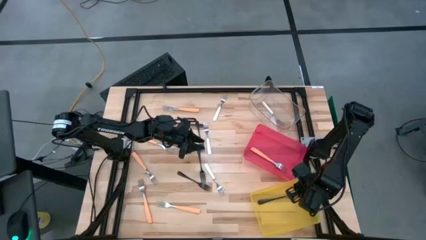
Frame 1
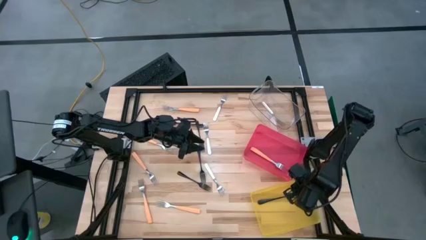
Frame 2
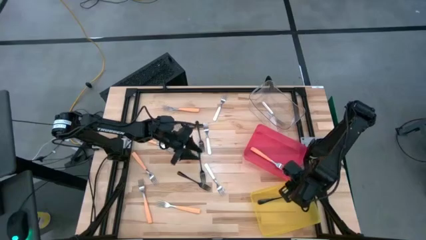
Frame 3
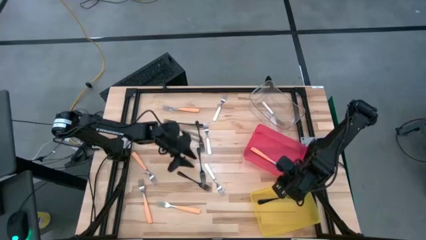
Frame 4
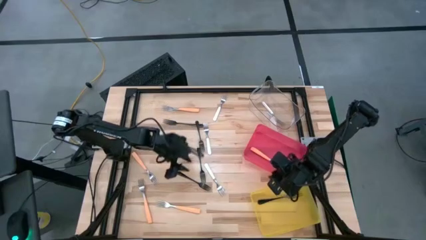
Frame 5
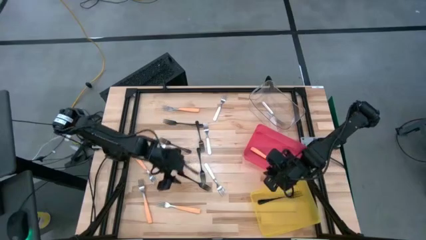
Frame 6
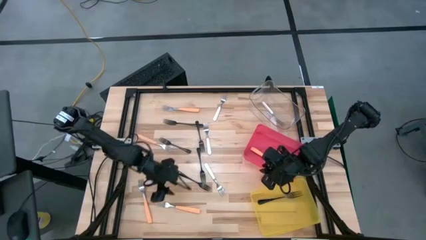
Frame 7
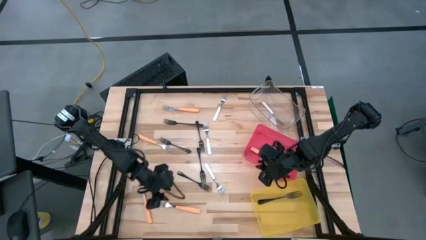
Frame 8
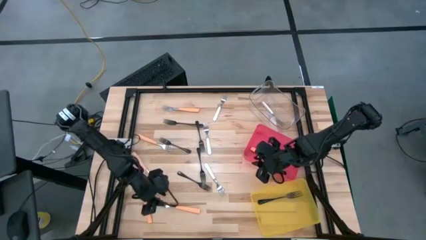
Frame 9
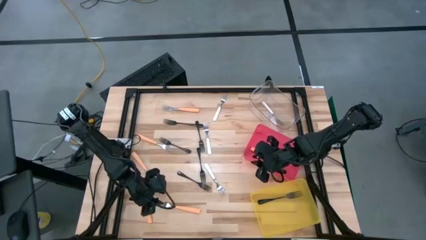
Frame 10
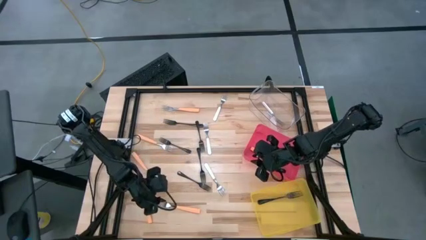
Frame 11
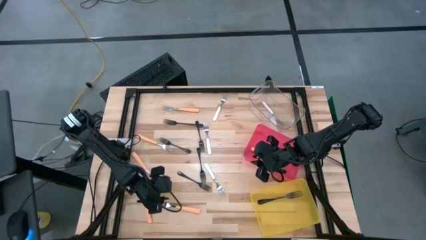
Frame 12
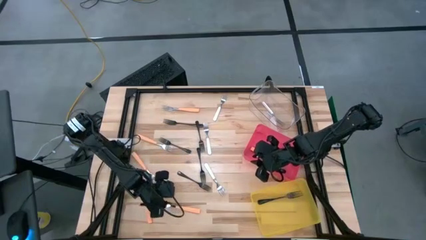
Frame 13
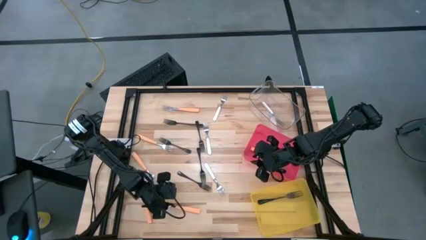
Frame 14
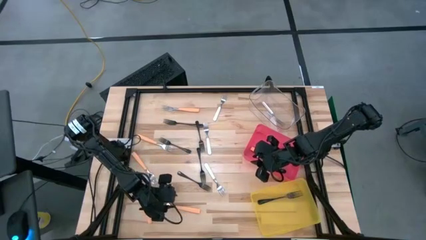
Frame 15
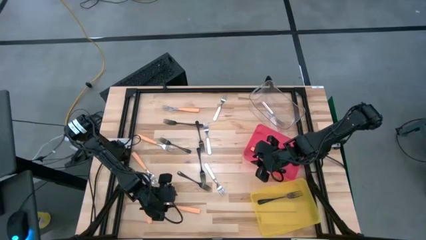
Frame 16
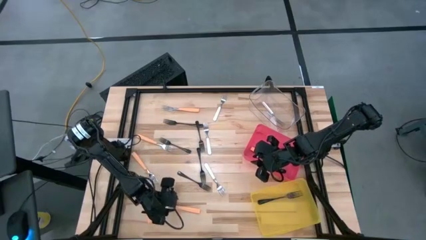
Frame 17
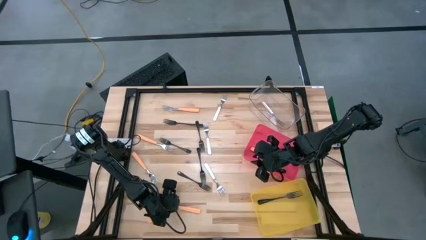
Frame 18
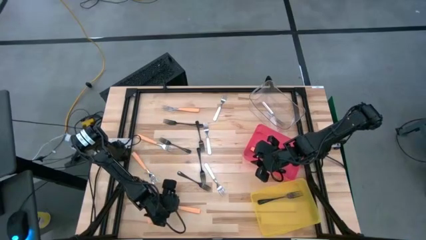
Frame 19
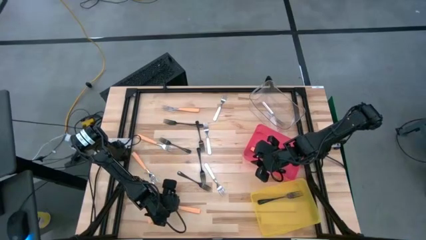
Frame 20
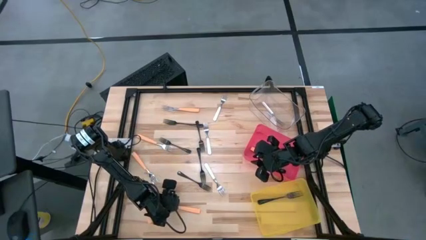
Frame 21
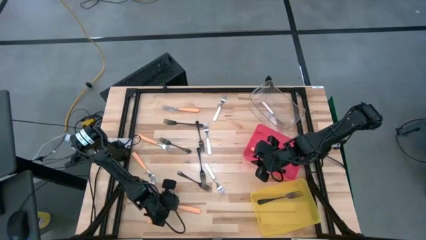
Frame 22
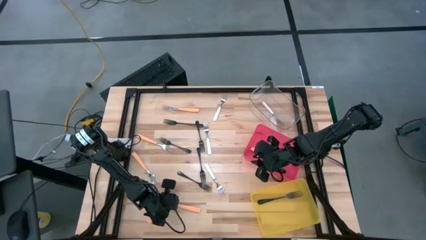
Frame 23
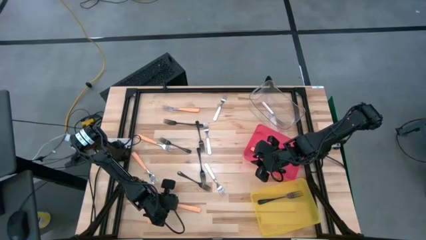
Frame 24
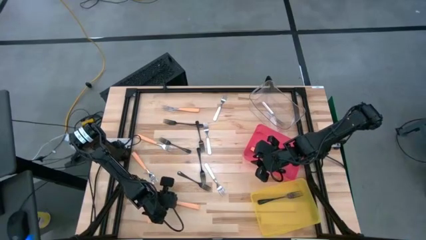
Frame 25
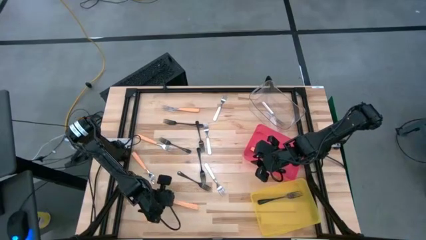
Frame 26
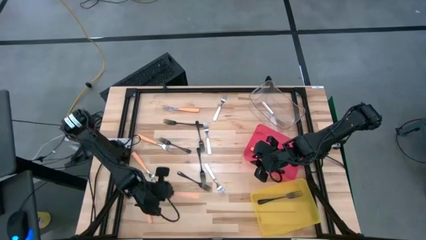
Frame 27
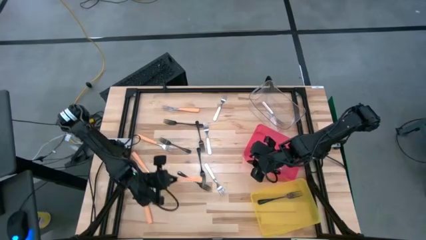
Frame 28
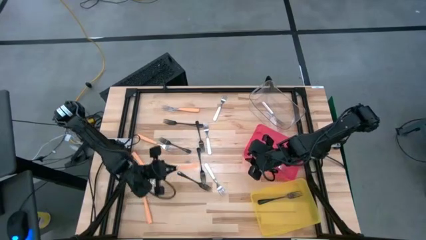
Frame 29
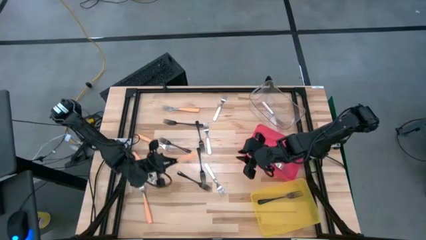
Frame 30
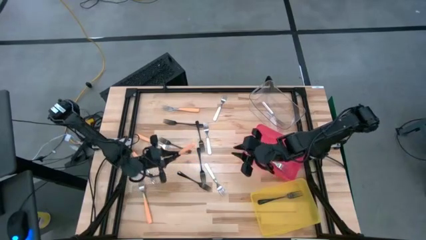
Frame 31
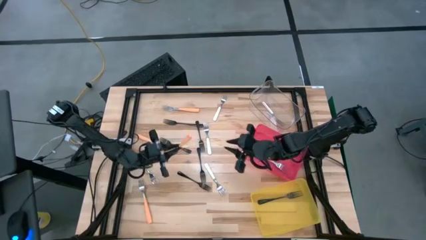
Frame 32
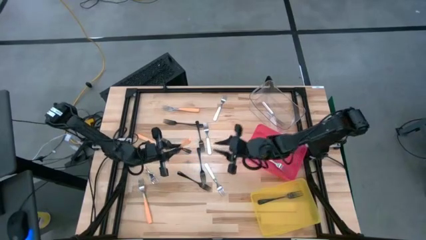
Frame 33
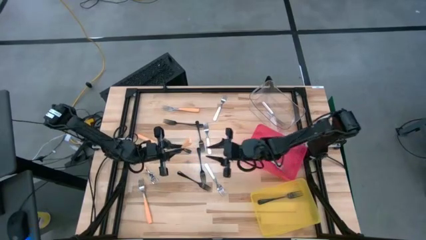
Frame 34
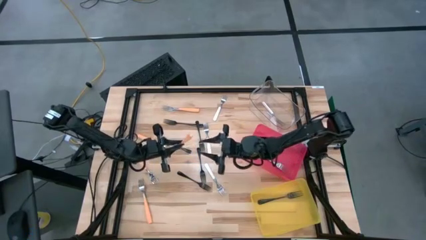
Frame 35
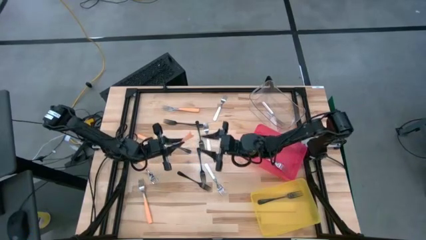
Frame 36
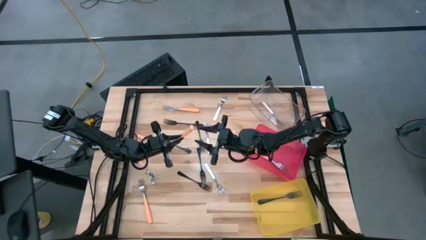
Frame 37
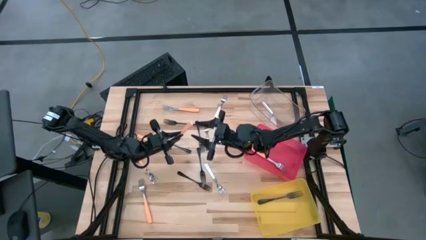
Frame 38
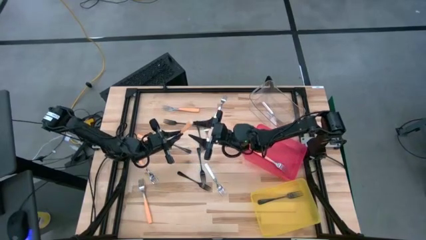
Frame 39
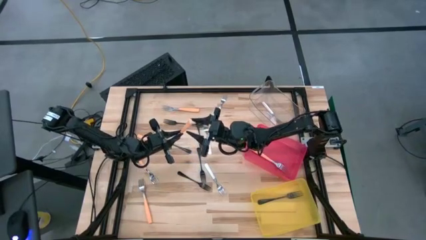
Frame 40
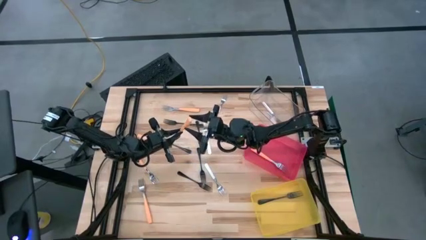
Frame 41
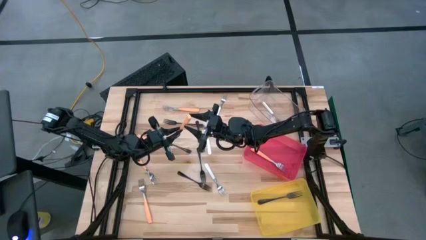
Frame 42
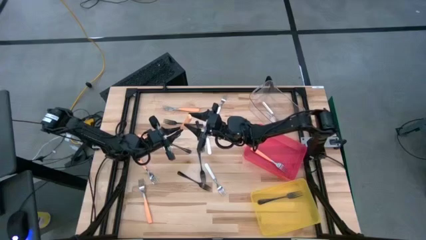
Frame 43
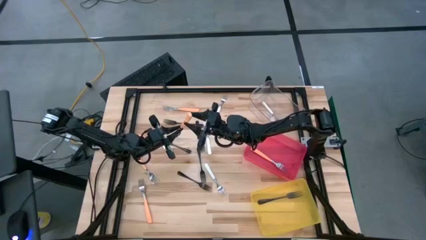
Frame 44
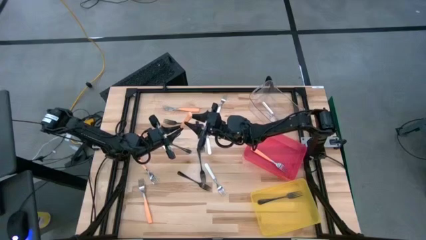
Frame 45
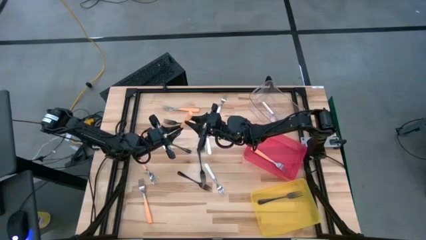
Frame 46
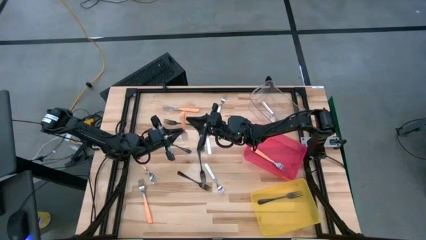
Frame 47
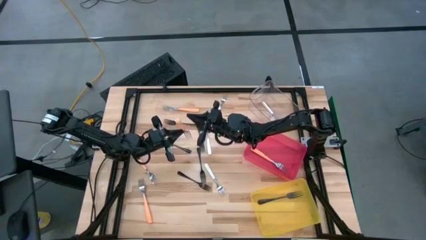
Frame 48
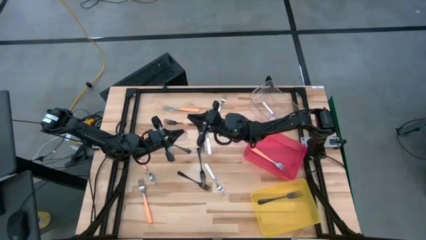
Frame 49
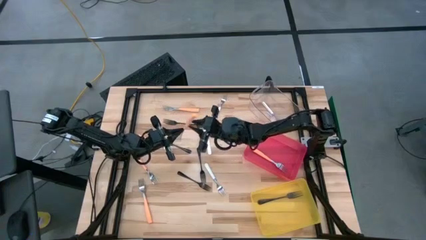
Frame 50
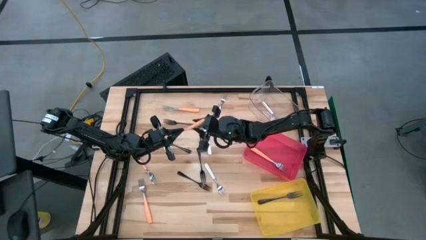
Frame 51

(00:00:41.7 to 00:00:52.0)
Task: Sort silverware by color (type)
Put the orange fork into the red bin
